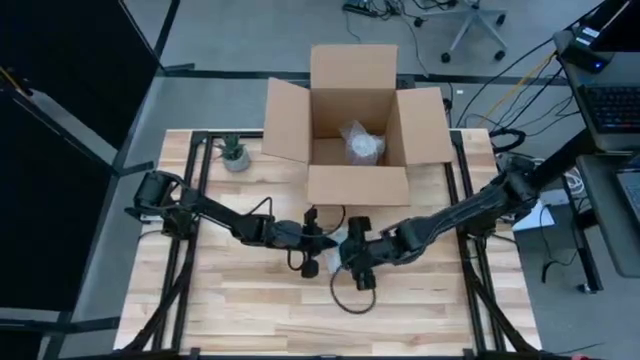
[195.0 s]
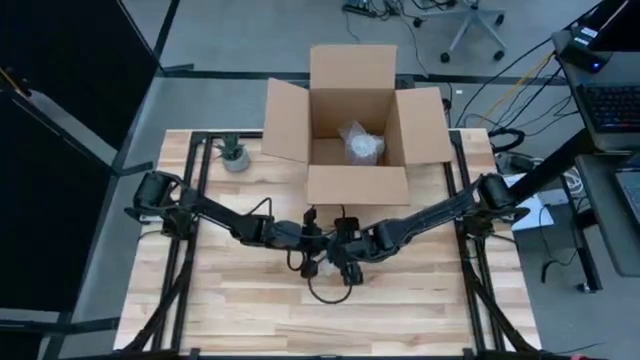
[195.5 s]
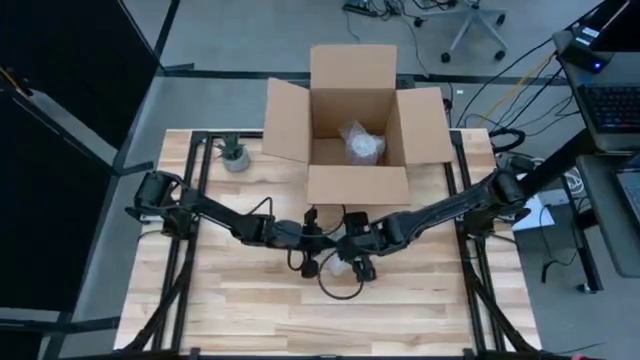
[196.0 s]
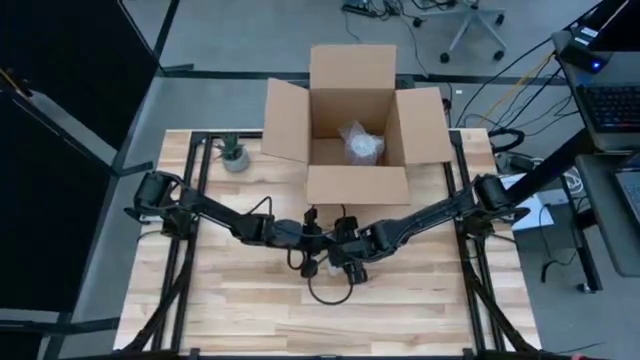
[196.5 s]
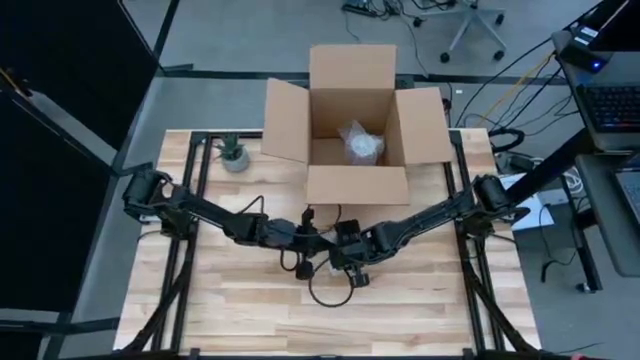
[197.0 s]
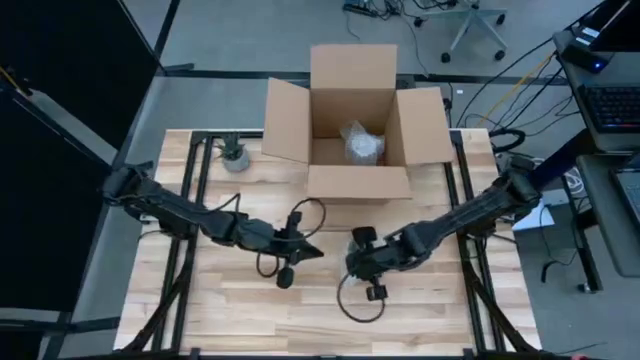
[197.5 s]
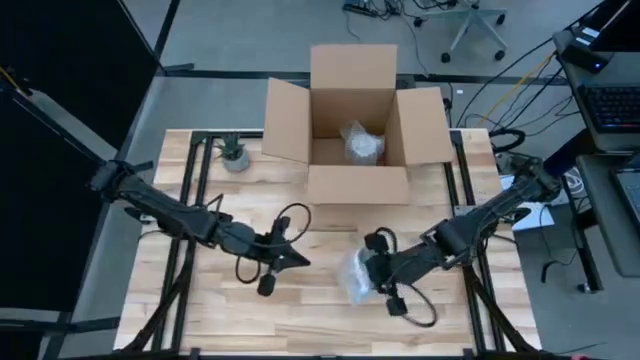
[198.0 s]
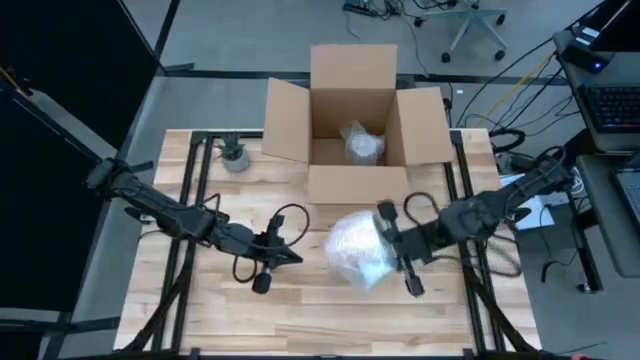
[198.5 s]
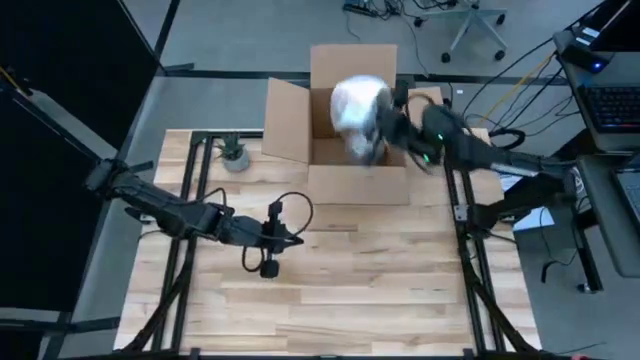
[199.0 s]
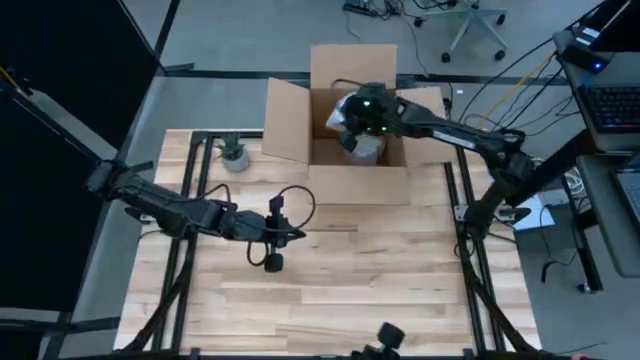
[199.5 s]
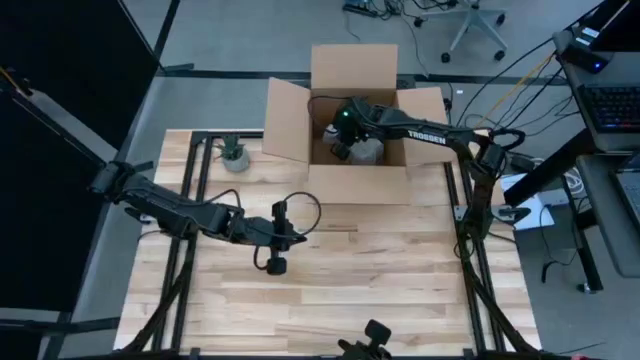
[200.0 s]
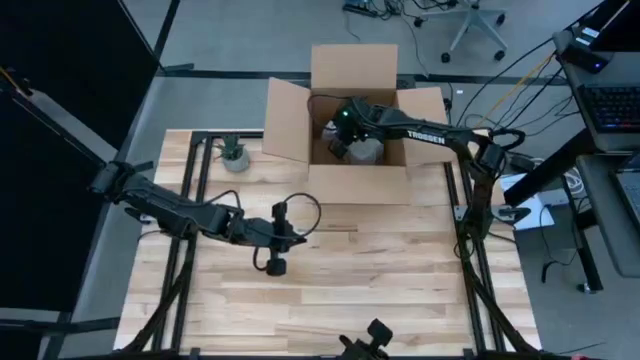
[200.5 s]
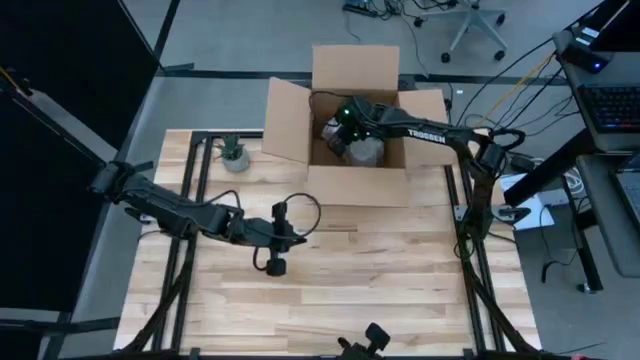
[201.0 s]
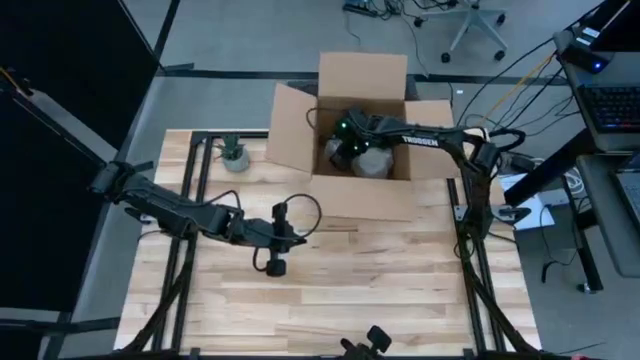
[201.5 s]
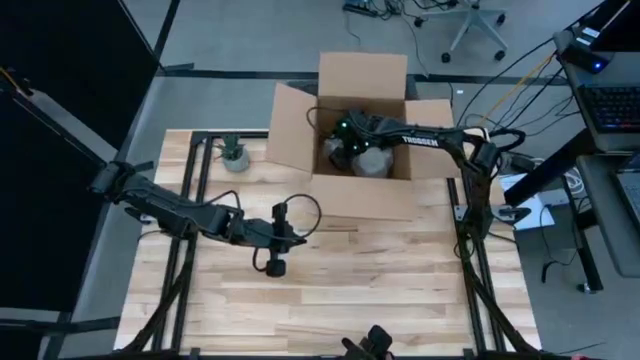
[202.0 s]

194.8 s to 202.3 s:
Task: wrap mug
Put the wrapped orange patterned mug into the card board box

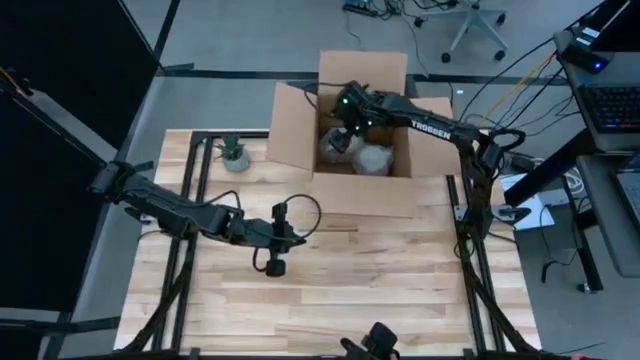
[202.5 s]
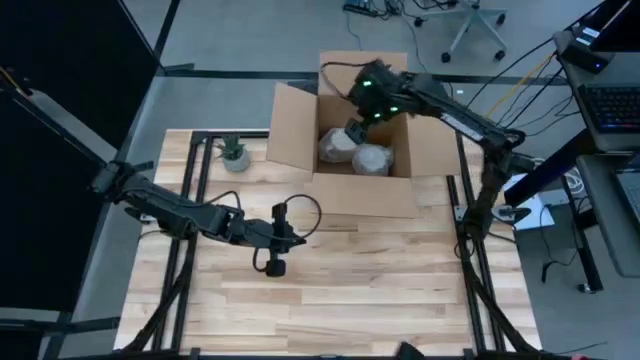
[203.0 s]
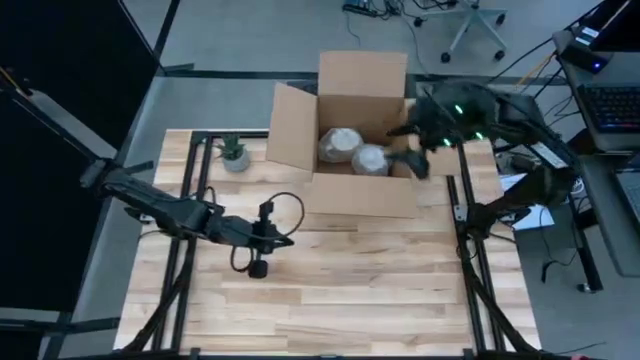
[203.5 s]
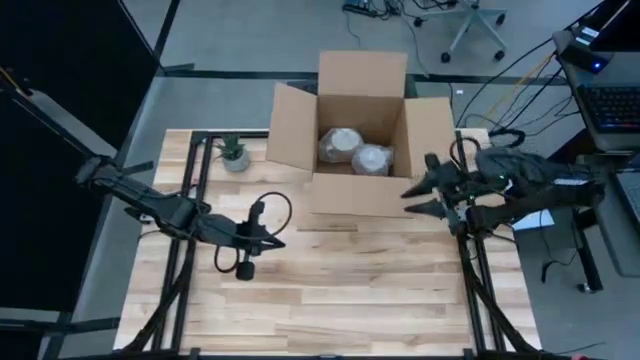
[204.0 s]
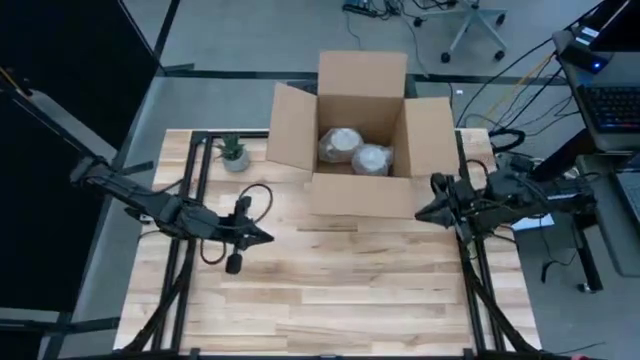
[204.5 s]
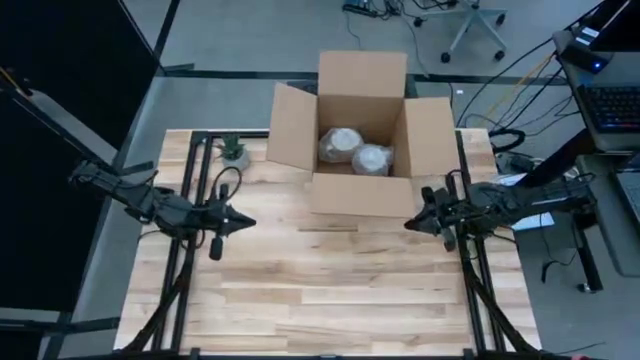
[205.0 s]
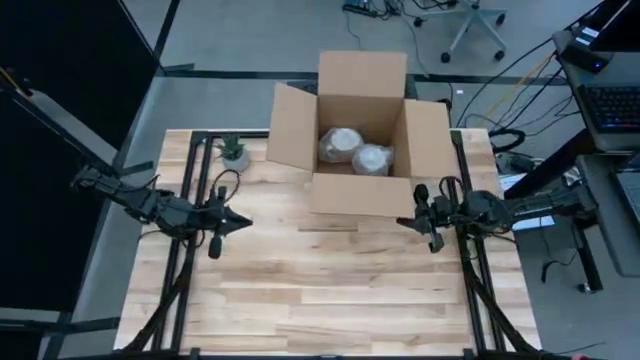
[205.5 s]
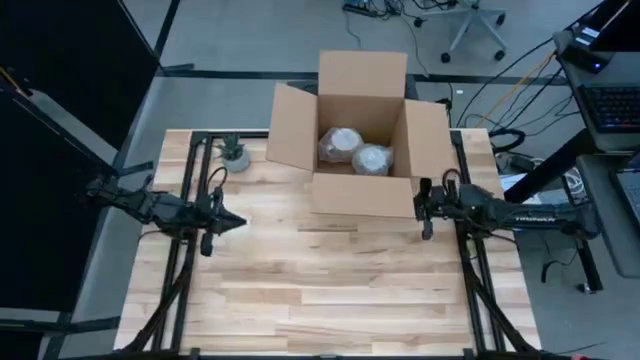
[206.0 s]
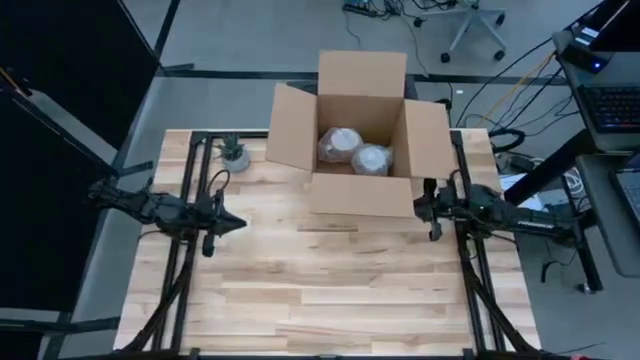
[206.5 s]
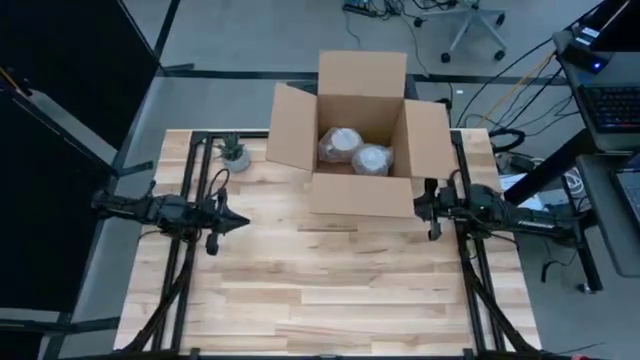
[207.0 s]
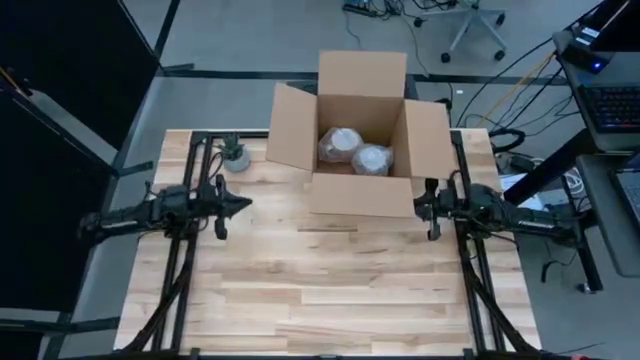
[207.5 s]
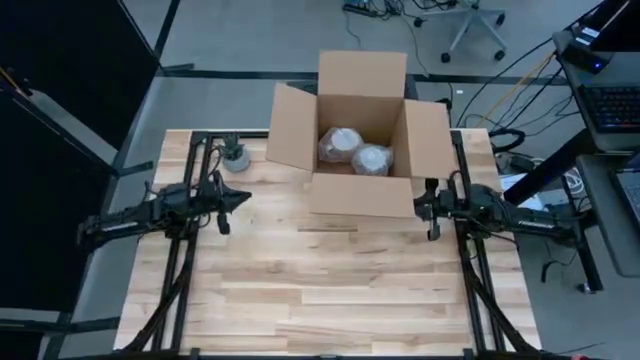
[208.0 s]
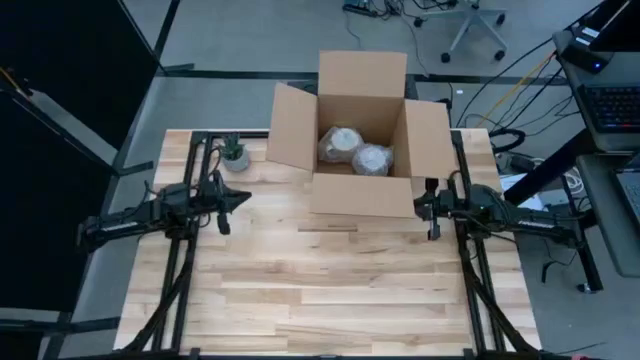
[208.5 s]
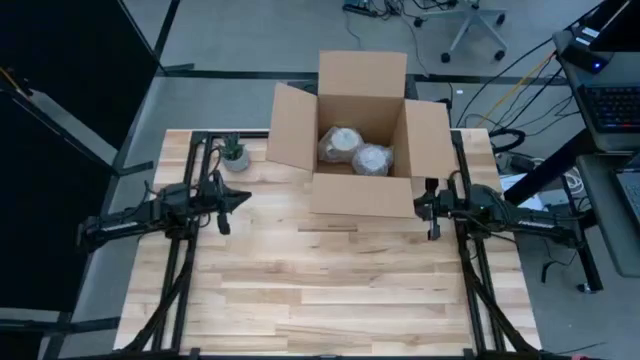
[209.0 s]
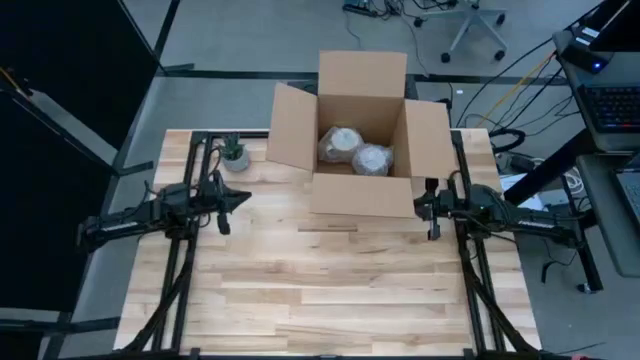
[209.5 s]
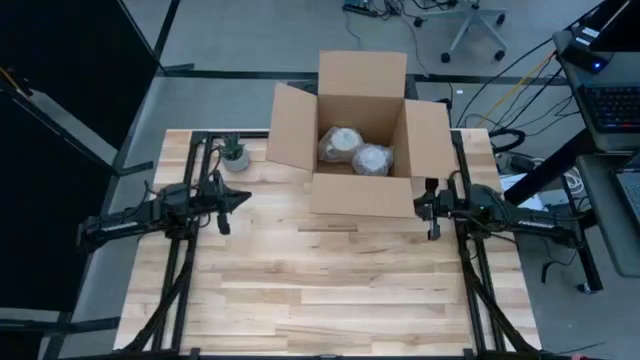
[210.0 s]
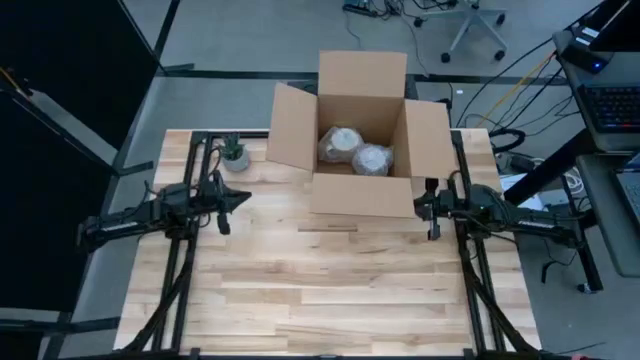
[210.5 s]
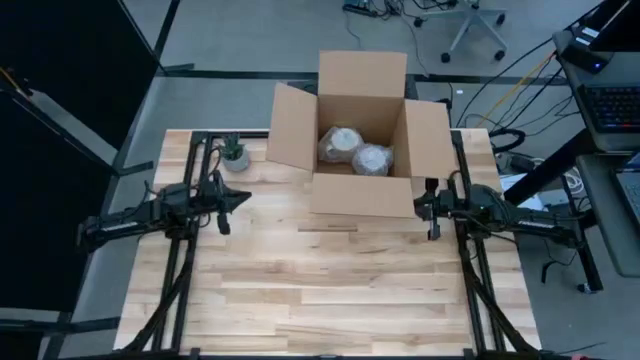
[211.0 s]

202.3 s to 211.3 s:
Return to Home Position

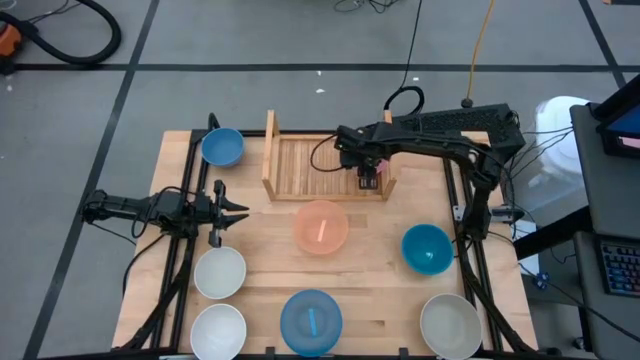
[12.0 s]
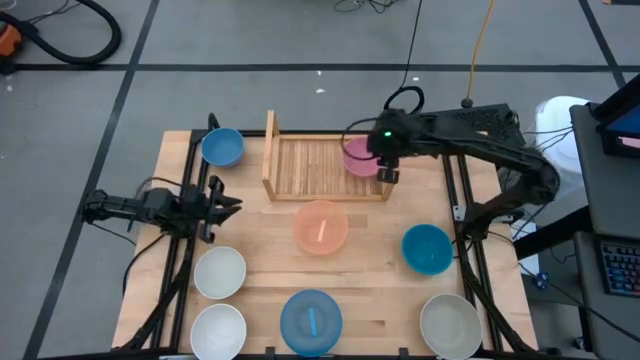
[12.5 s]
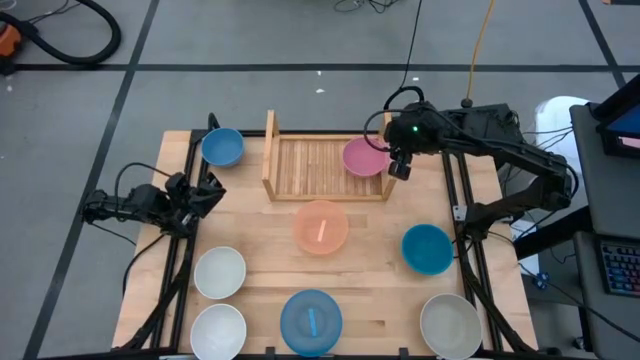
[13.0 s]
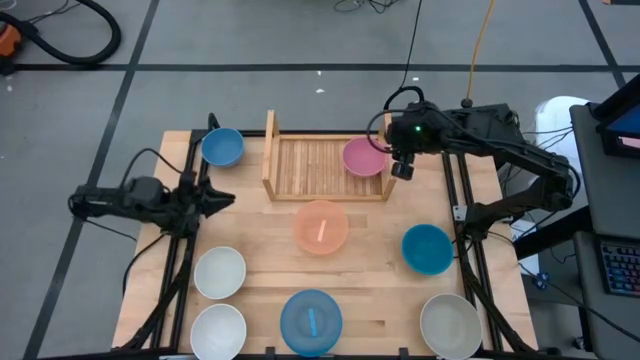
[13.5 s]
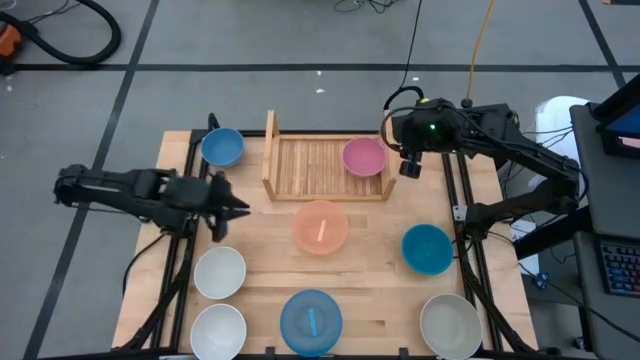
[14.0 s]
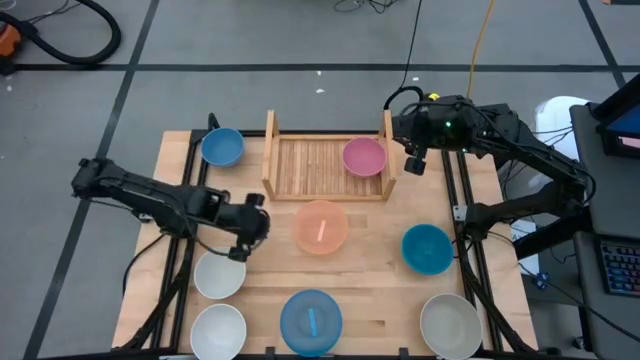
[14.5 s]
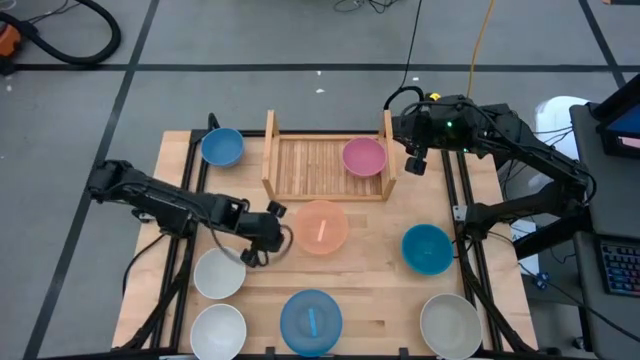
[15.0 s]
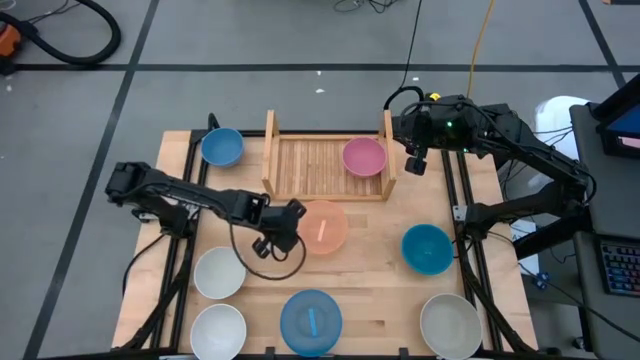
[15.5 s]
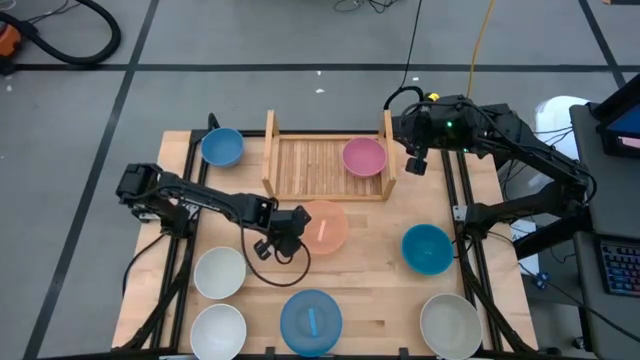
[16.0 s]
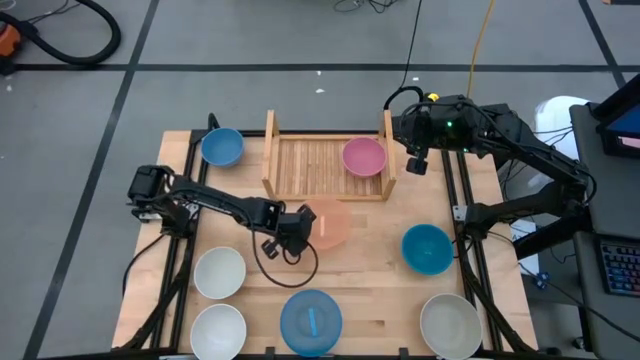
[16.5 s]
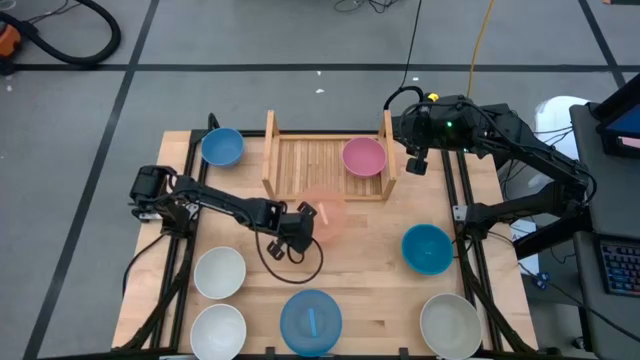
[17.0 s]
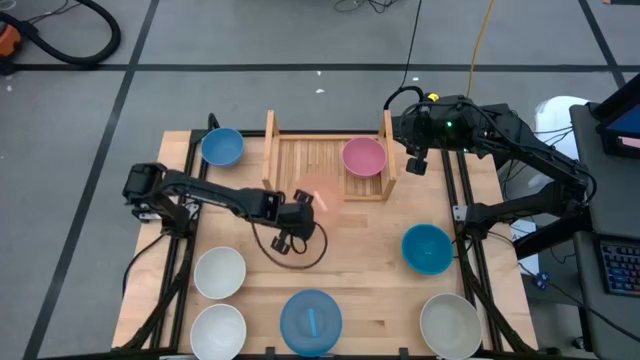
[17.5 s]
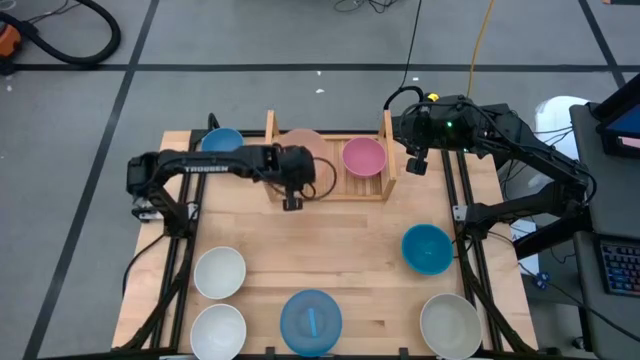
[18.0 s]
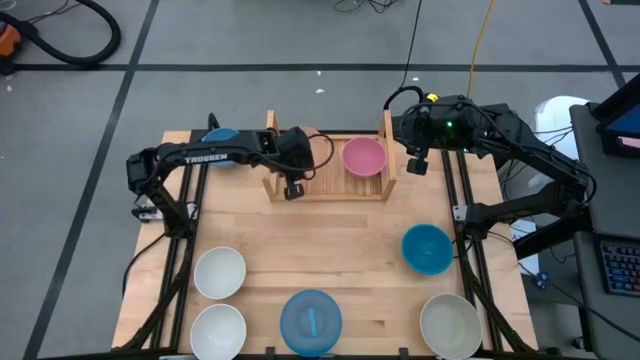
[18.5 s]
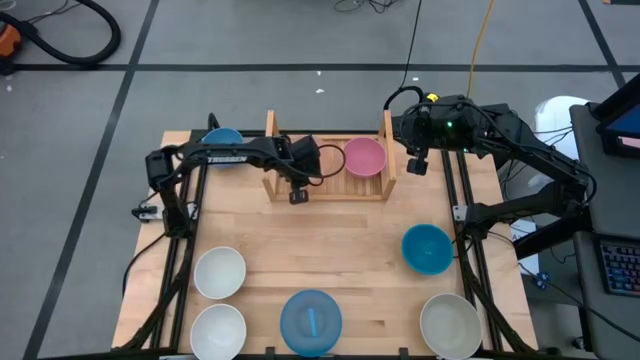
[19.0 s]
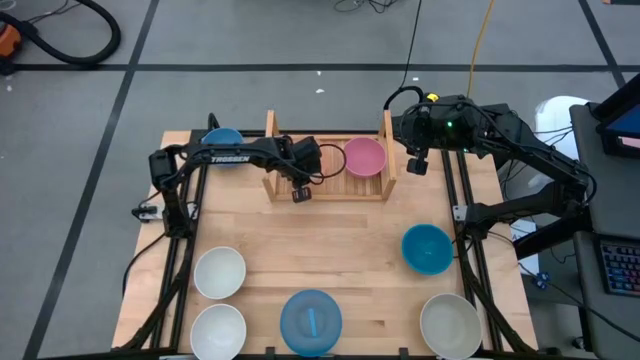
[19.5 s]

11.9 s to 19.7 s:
Task: Place and stack bowls onto a shelf
Put the orange bowl on the shelf
